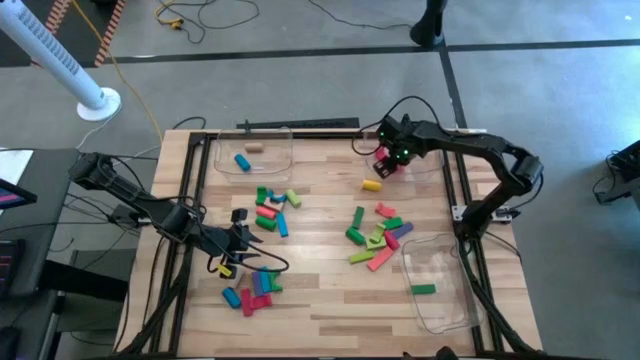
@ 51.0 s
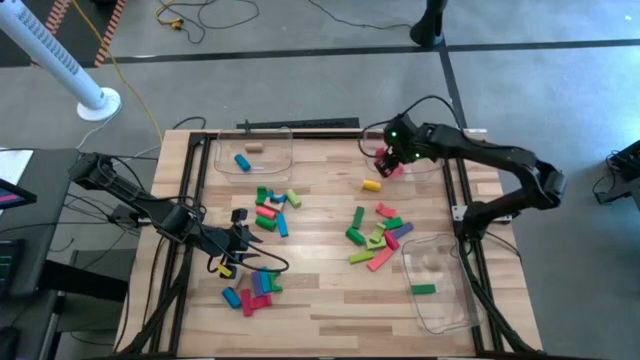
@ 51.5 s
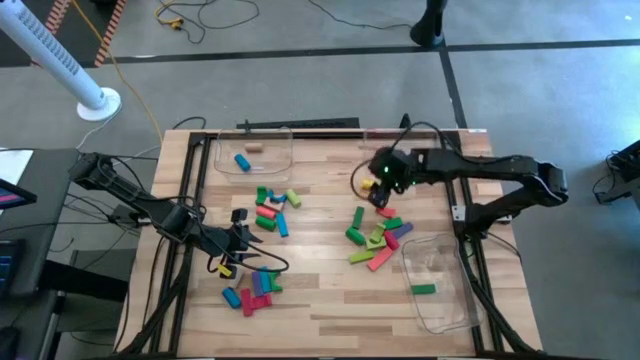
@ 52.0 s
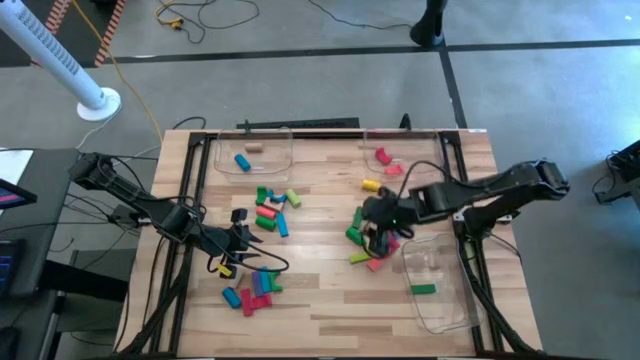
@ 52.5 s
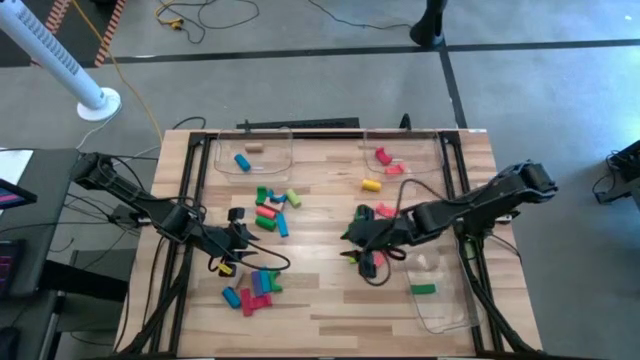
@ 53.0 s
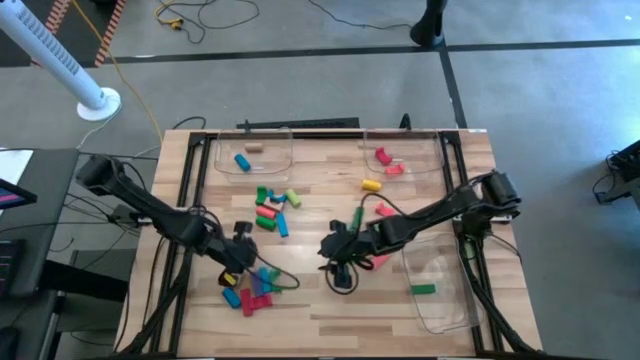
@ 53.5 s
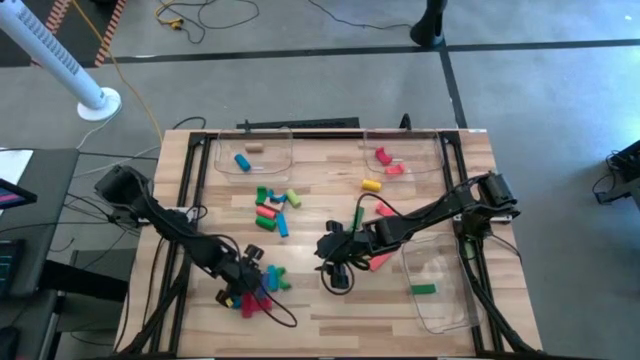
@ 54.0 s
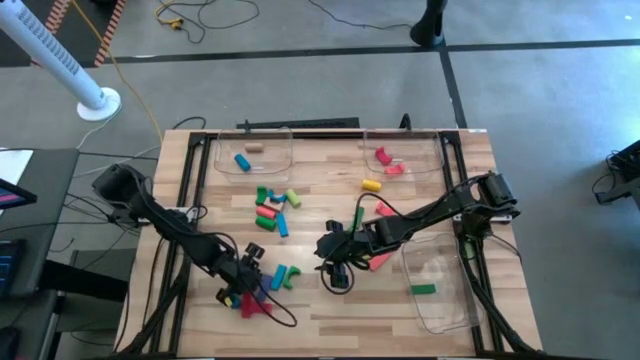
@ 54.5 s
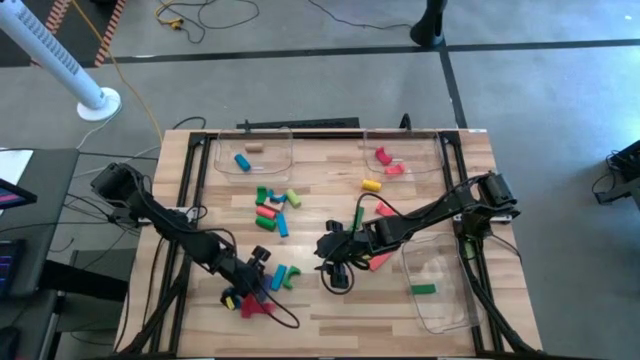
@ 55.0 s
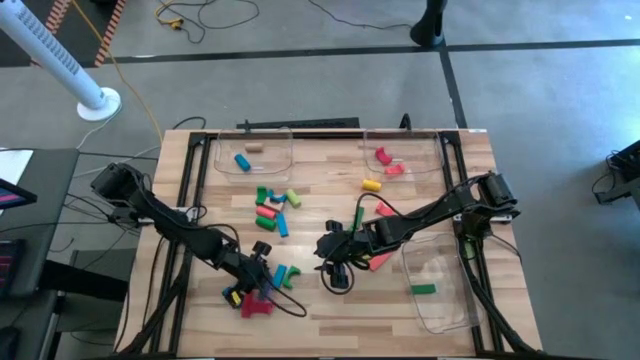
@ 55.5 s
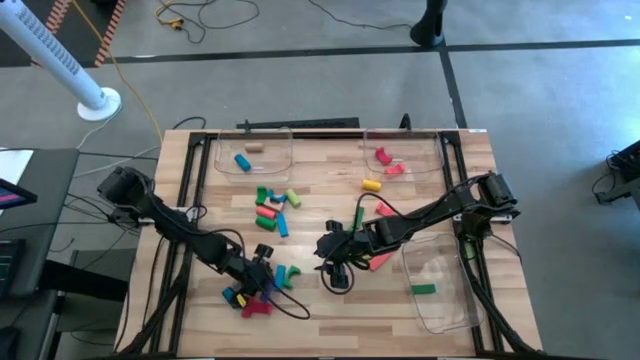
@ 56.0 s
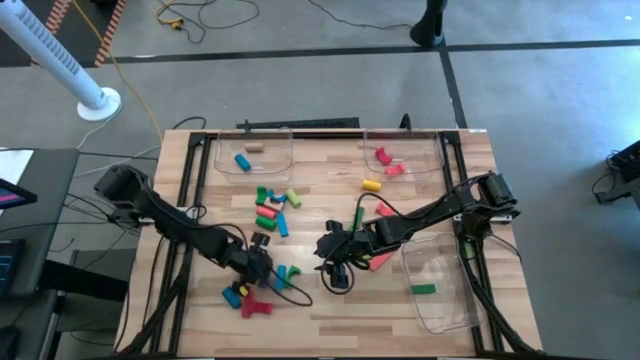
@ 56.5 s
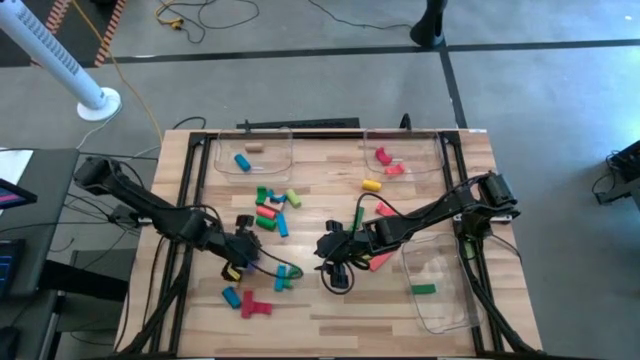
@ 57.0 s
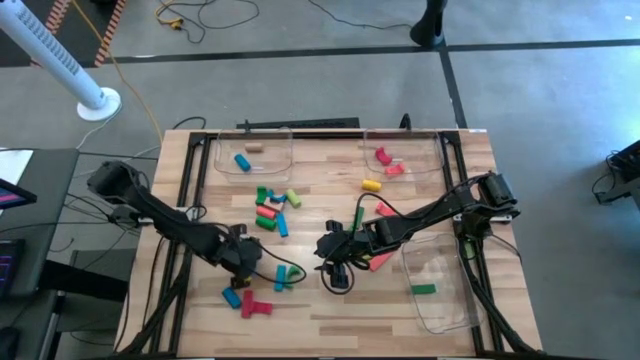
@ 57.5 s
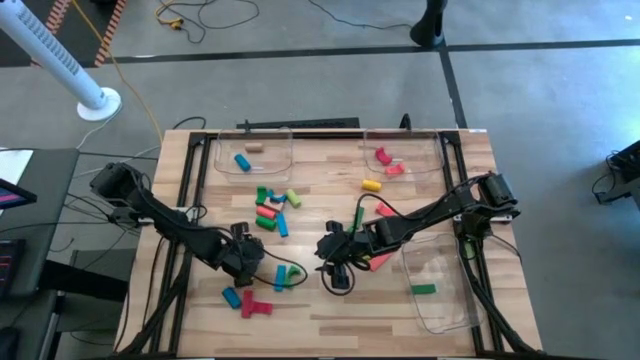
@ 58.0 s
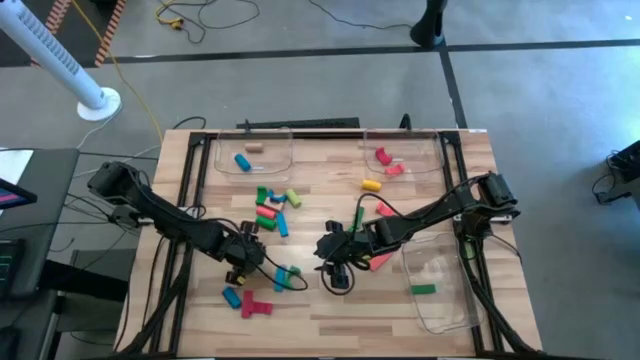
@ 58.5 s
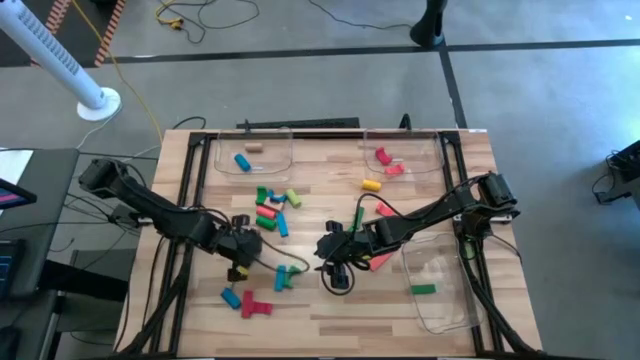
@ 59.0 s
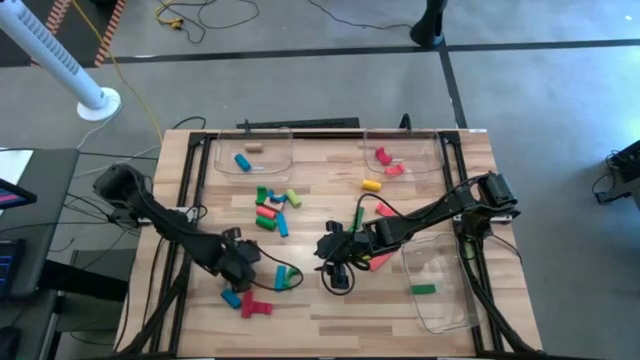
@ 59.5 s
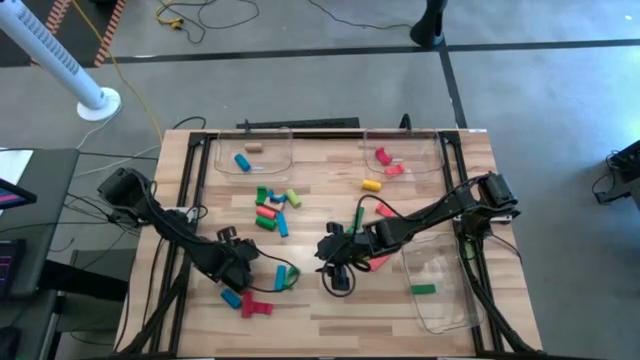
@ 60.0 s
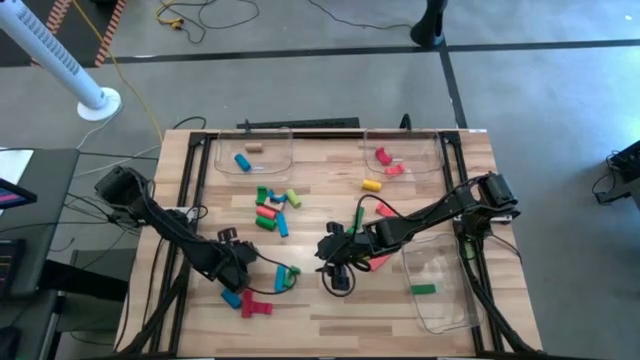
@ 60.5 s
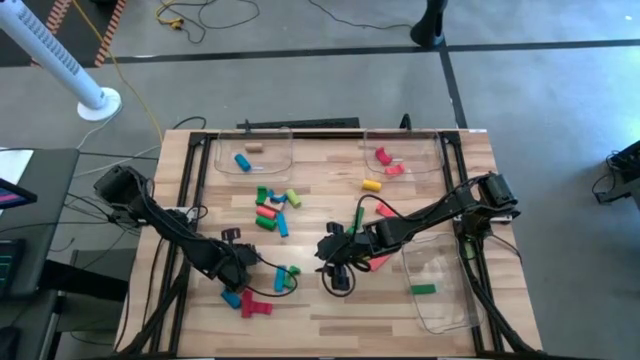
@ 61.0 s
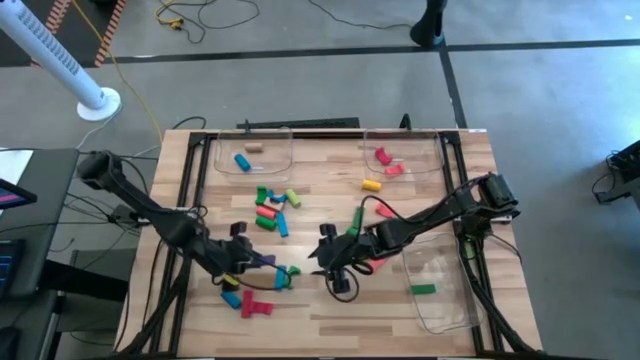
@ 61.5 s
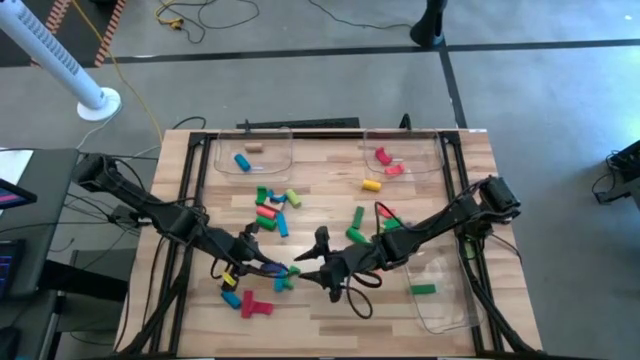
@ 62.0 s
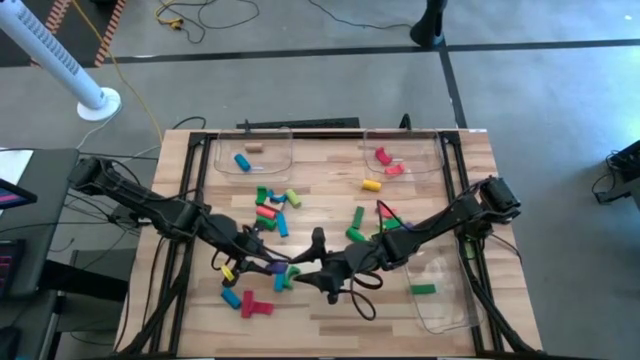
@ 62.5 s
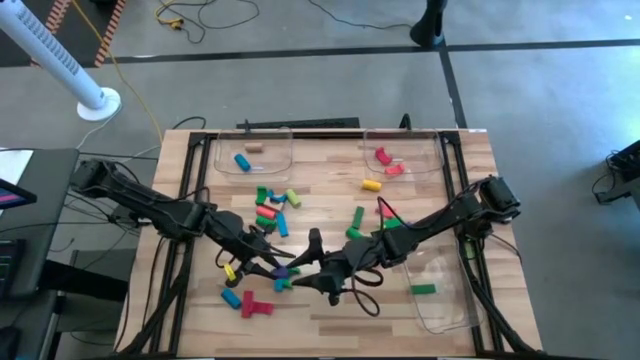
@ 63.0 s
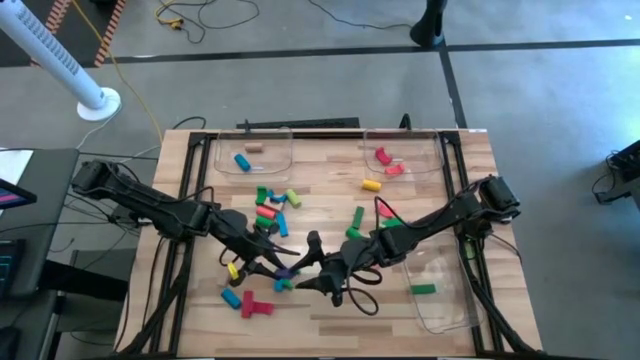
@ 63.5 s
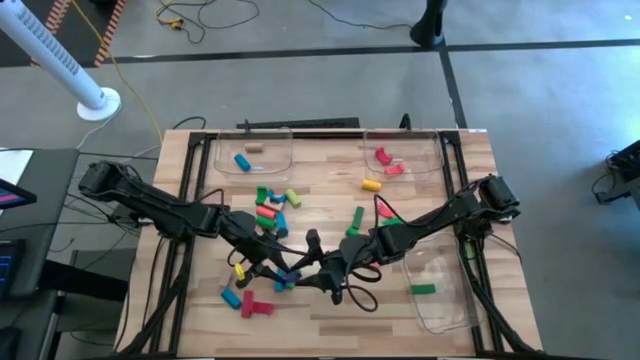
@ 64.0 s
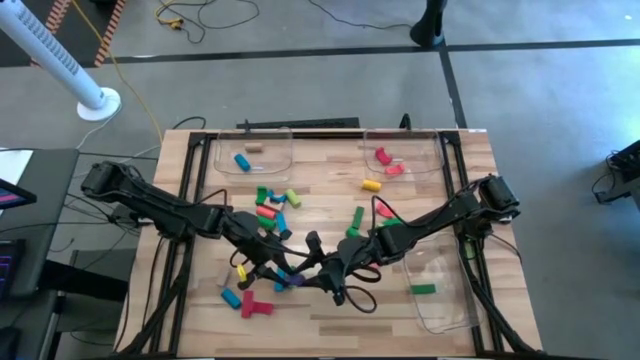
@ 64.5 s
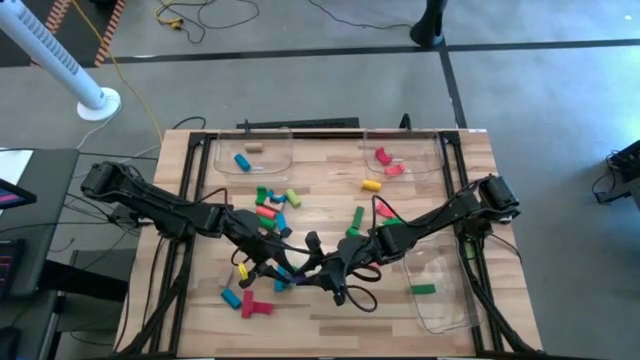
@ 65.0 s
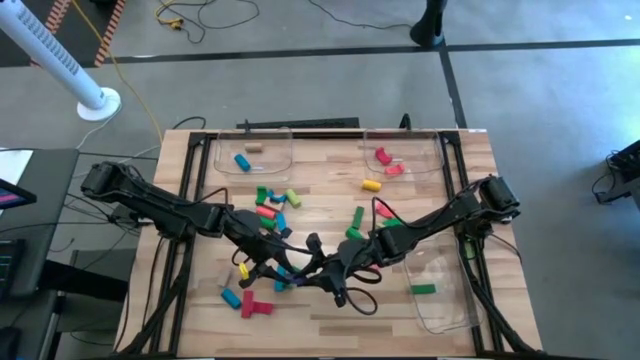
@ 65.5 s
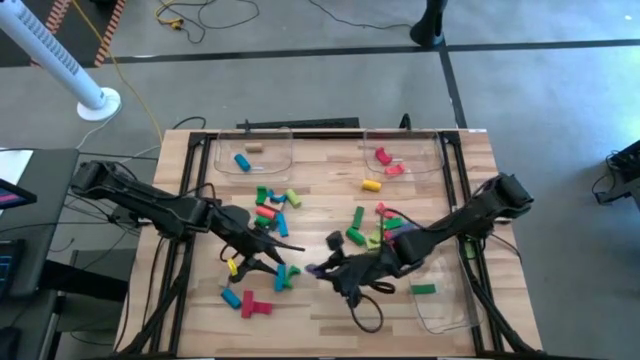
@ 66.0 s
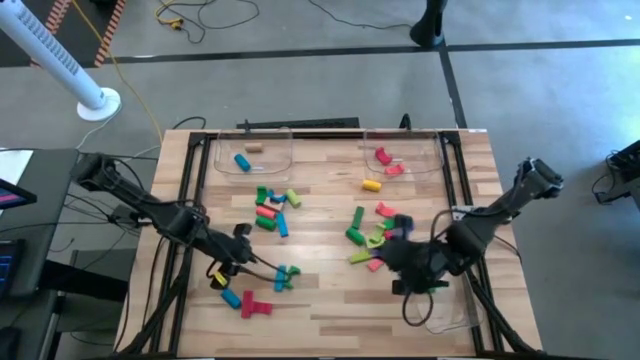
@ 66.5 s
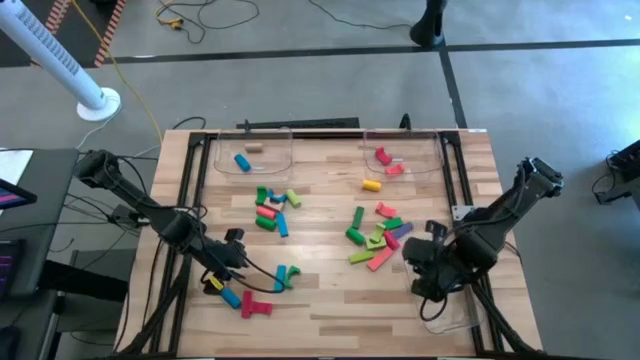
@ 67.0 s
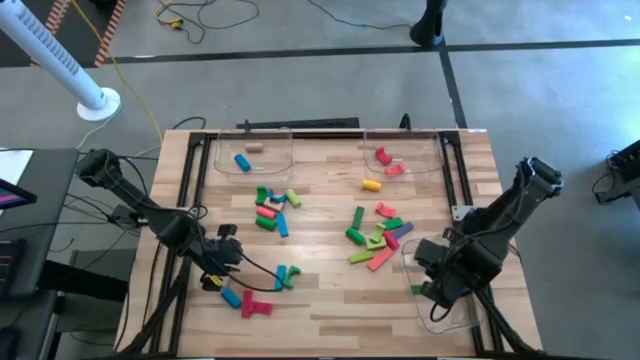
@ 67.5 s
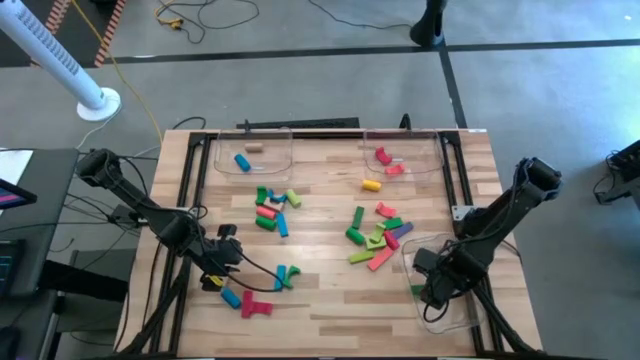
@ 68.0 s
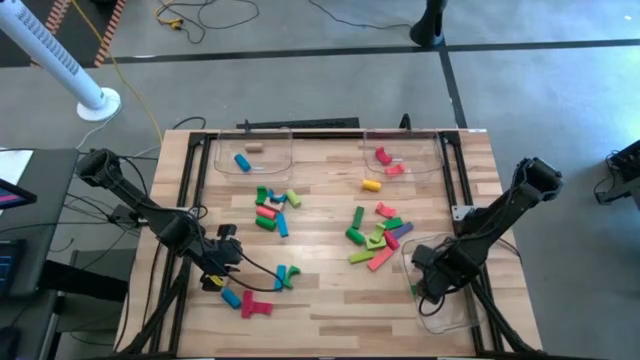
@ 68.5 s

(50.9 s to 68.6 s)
Task: Sort blocks by size
Put the blue rectangular block into the bottom transparent bin

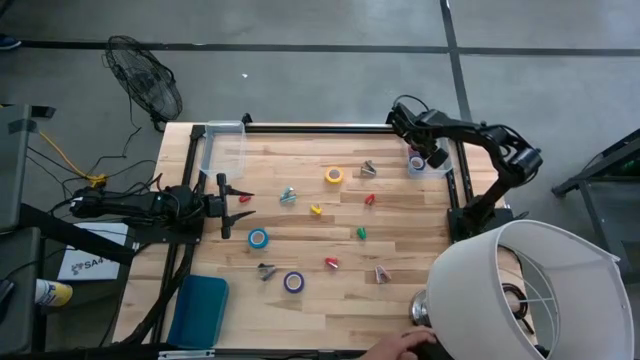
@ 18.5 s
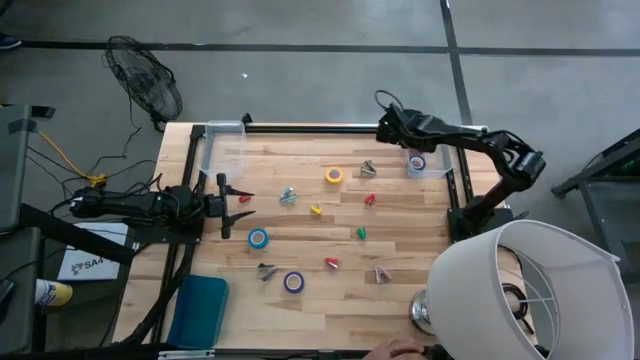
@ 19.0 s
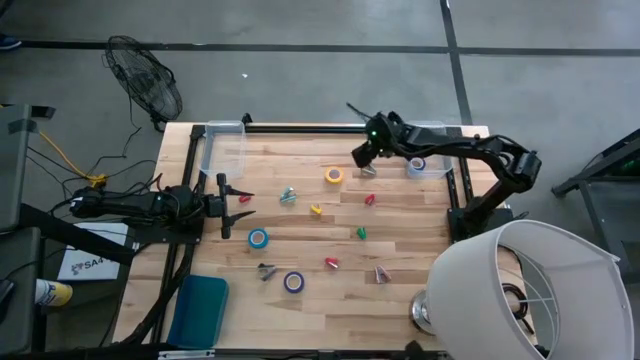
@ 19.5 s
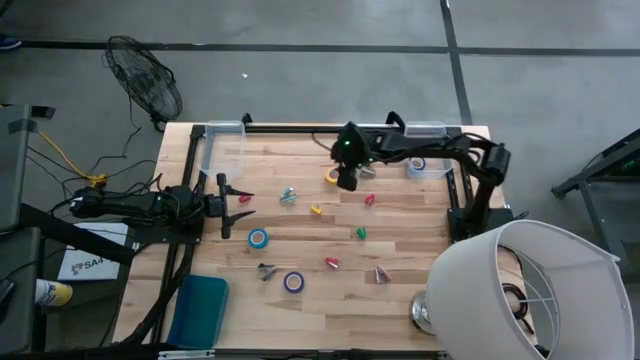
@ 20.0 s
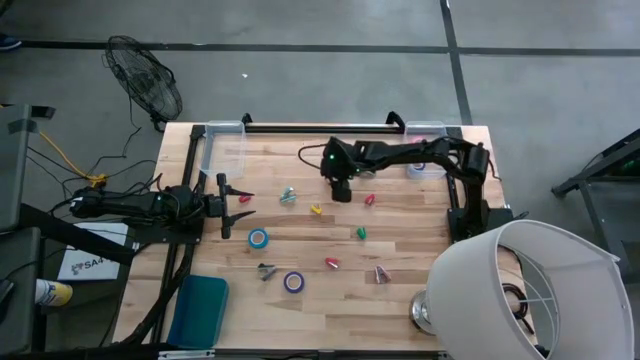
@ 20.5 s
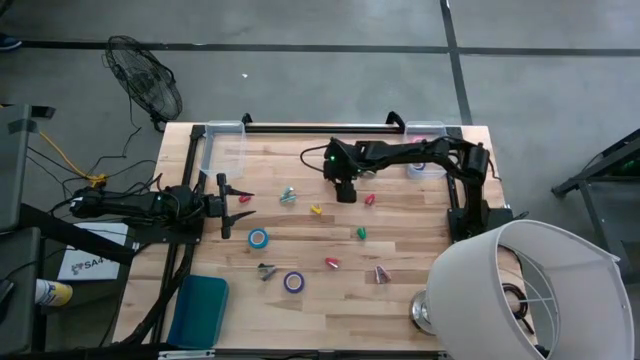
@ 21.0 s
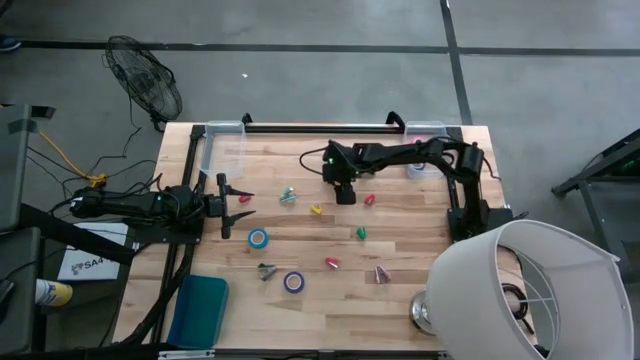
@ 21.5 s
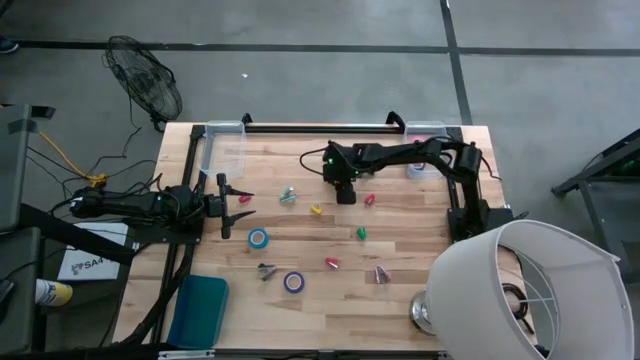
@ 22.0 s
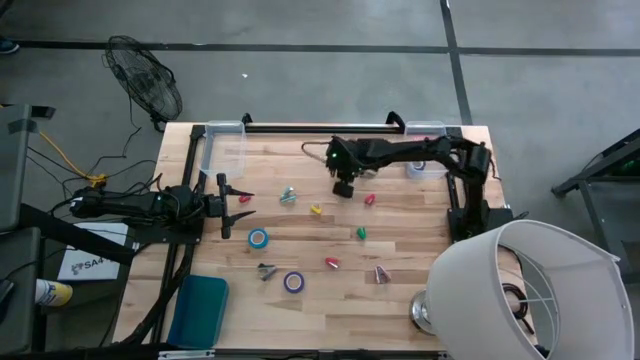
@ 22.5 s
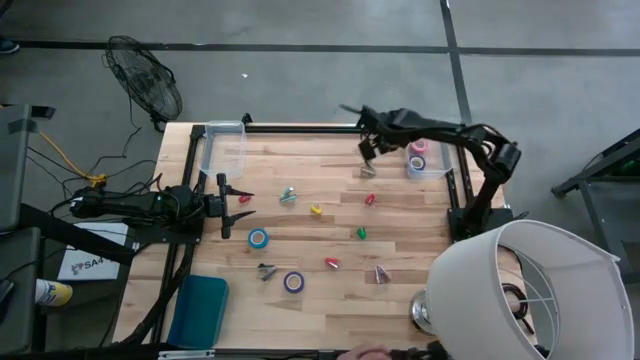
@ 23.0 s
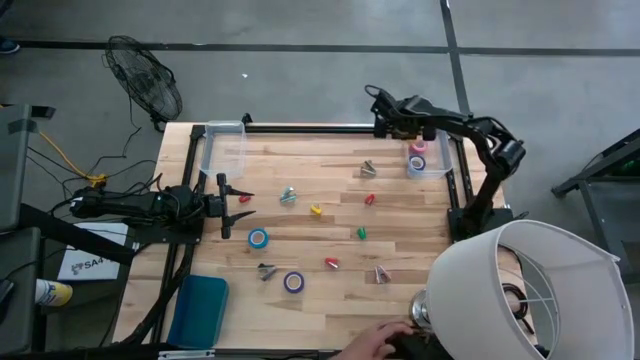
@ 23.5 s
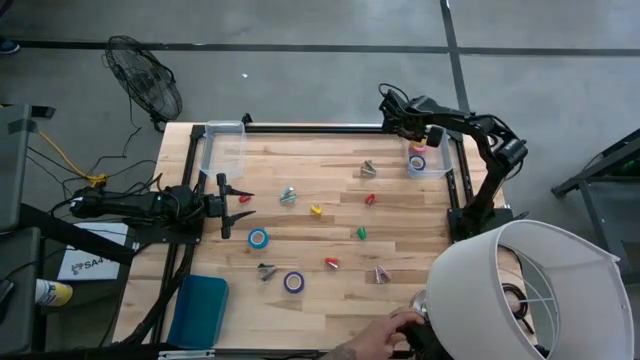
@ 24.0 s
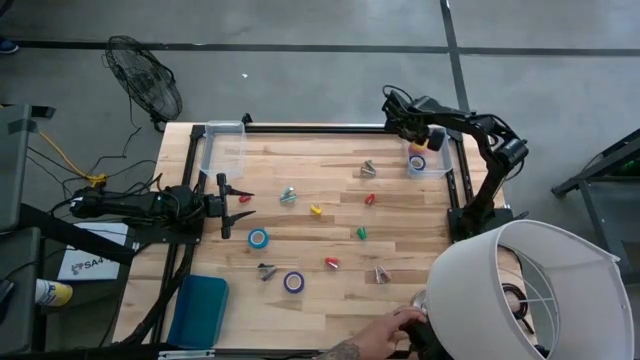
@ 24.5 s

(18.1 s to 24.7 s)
Task: Pick and place Stapler, Stapler remover, tape
Put the yellow tape into the right transparent bin
